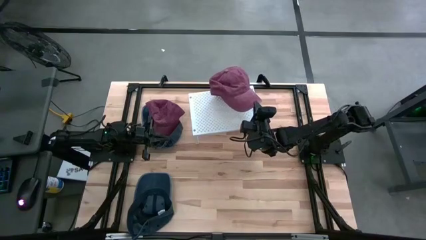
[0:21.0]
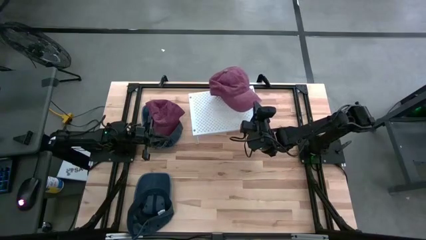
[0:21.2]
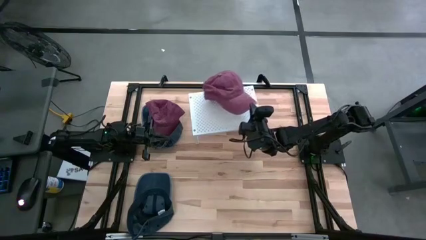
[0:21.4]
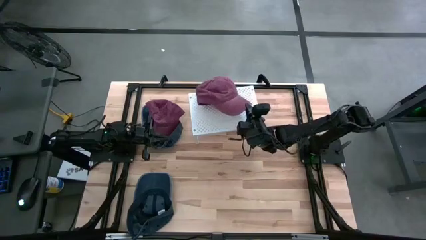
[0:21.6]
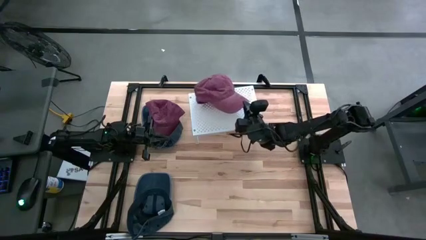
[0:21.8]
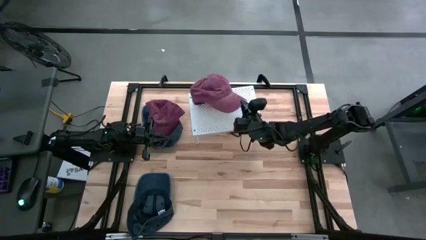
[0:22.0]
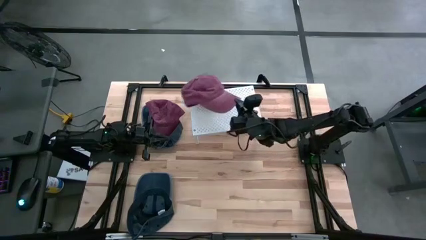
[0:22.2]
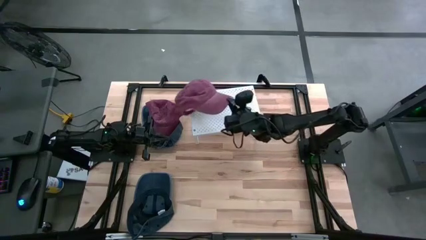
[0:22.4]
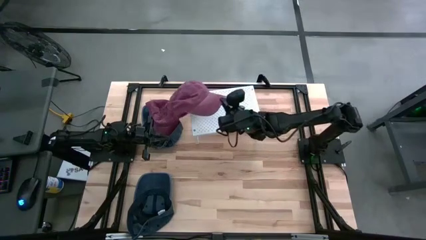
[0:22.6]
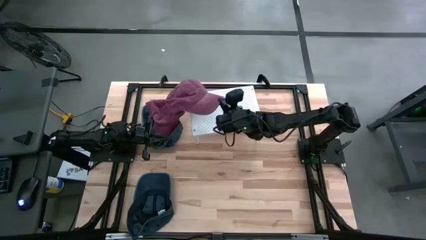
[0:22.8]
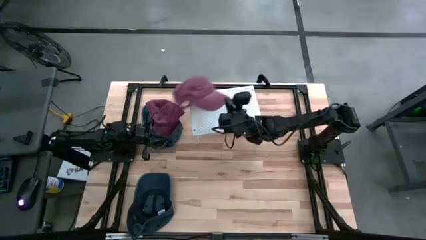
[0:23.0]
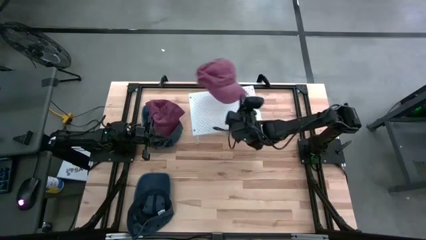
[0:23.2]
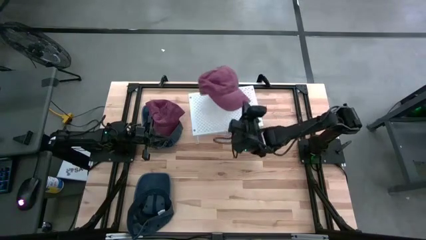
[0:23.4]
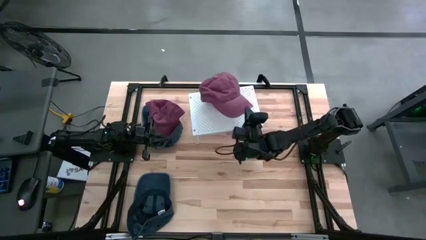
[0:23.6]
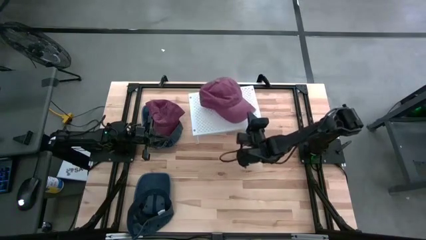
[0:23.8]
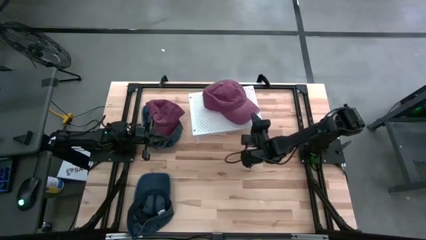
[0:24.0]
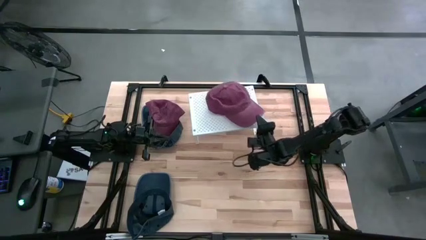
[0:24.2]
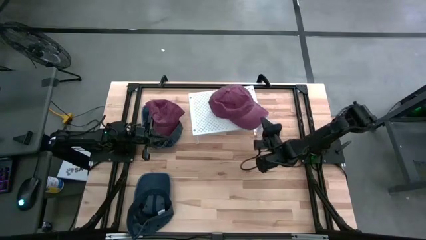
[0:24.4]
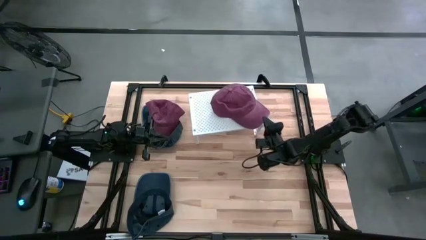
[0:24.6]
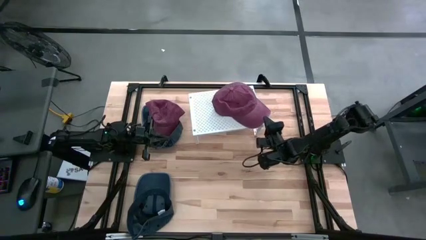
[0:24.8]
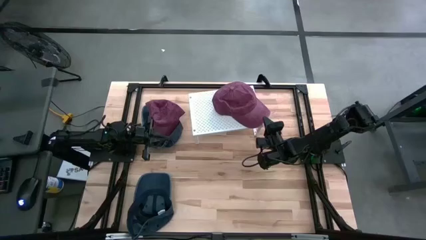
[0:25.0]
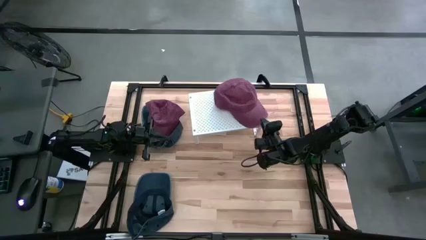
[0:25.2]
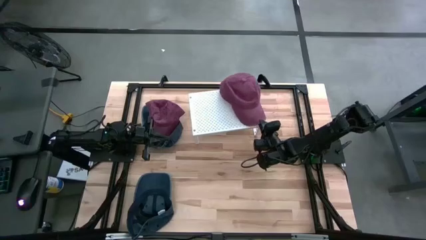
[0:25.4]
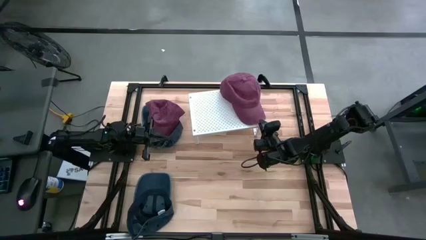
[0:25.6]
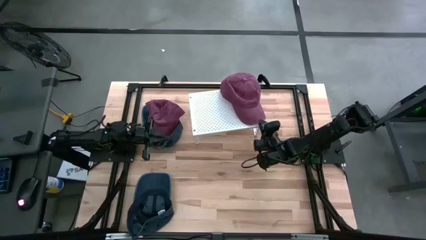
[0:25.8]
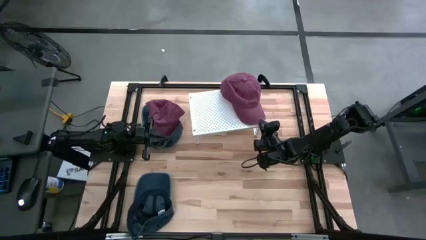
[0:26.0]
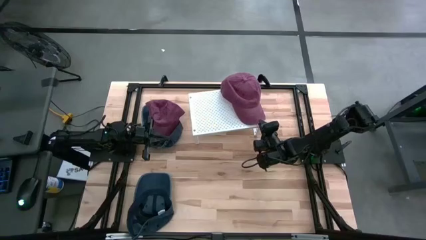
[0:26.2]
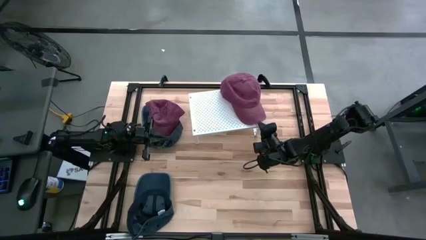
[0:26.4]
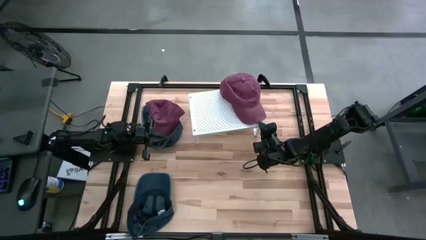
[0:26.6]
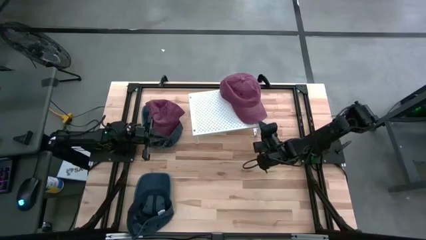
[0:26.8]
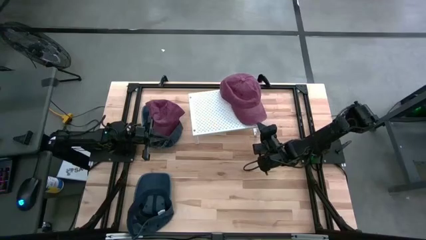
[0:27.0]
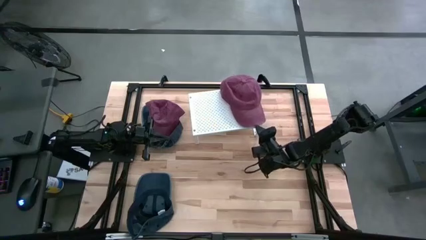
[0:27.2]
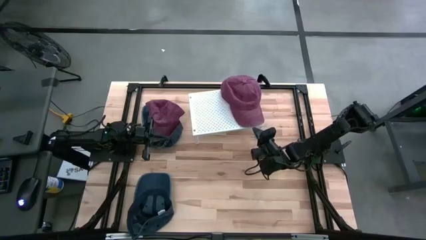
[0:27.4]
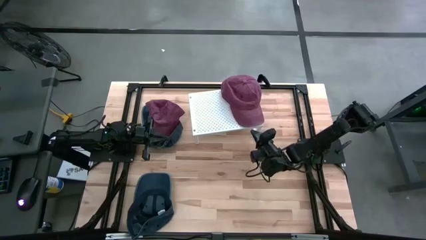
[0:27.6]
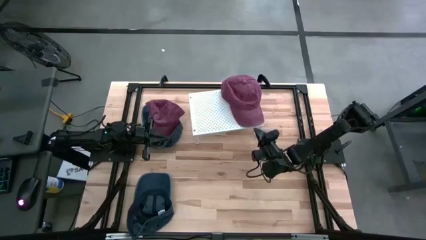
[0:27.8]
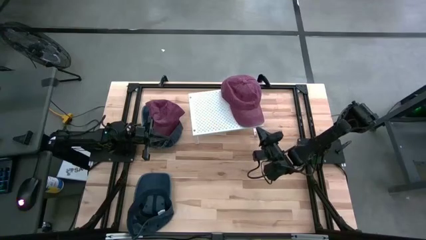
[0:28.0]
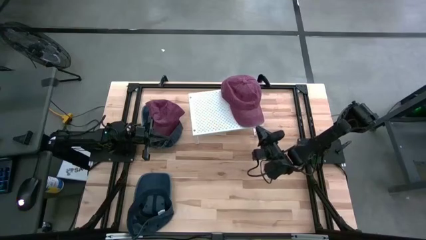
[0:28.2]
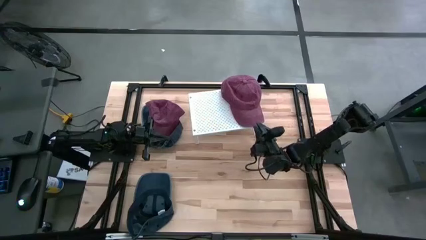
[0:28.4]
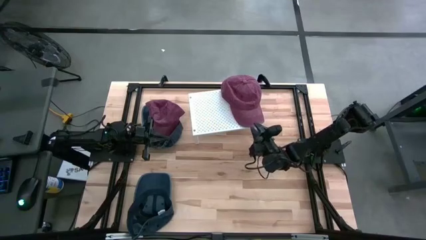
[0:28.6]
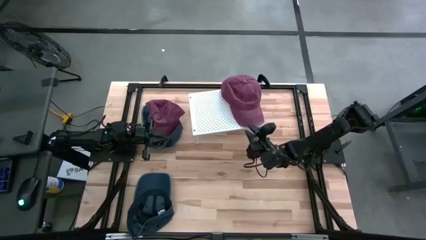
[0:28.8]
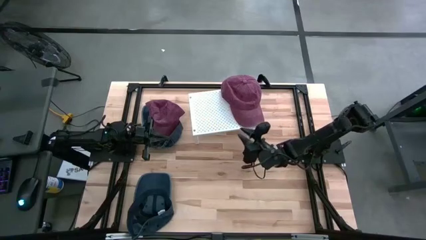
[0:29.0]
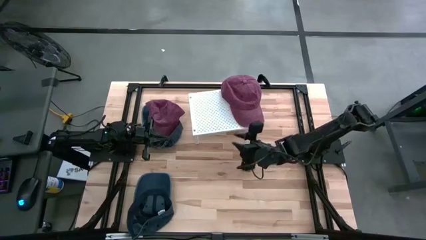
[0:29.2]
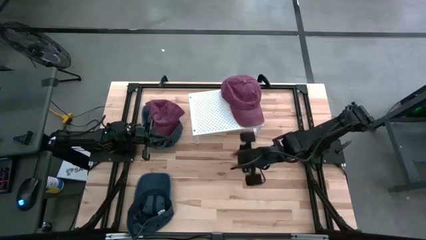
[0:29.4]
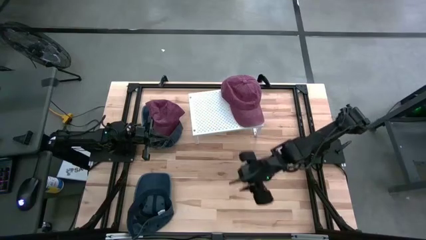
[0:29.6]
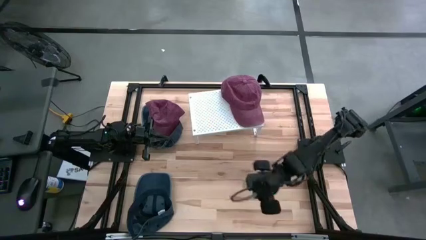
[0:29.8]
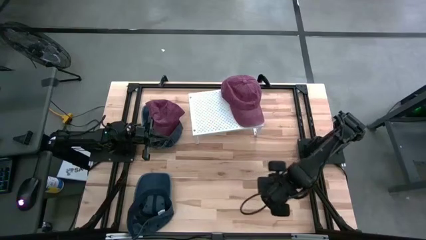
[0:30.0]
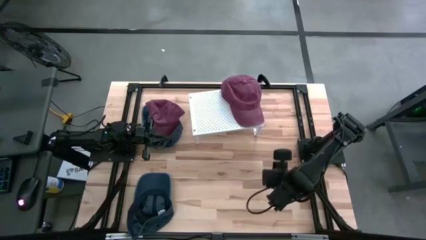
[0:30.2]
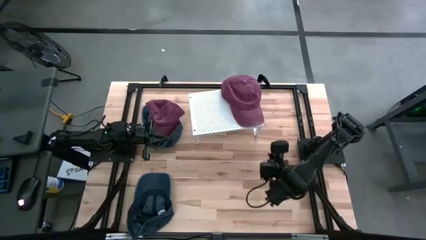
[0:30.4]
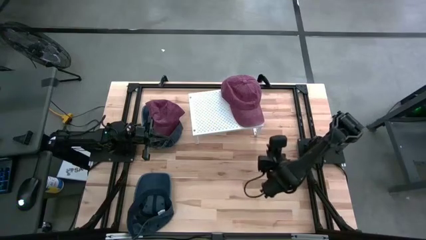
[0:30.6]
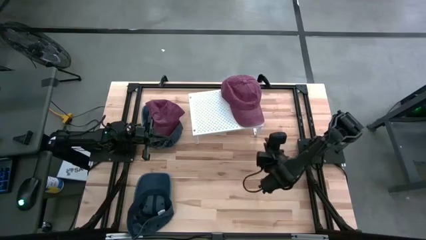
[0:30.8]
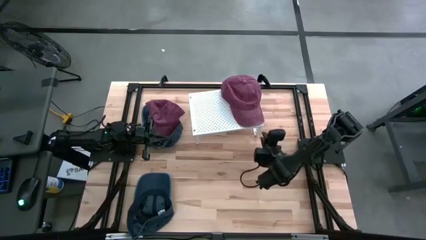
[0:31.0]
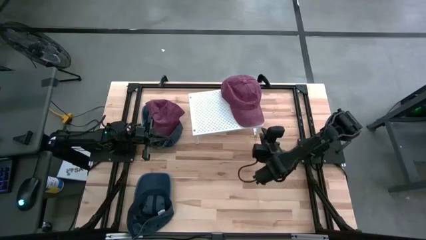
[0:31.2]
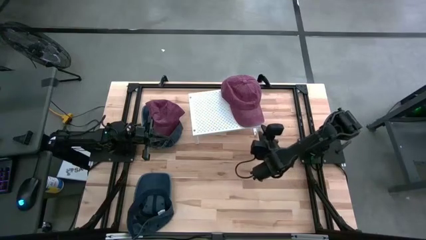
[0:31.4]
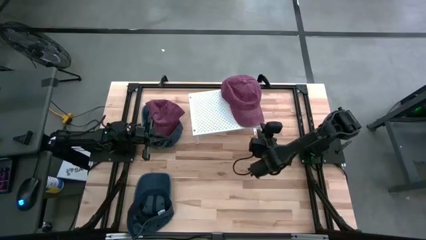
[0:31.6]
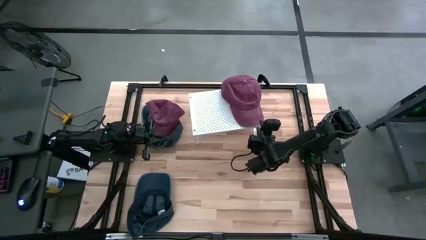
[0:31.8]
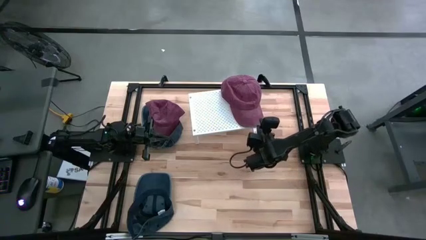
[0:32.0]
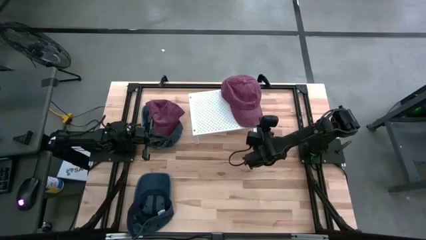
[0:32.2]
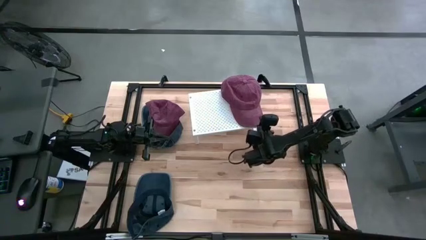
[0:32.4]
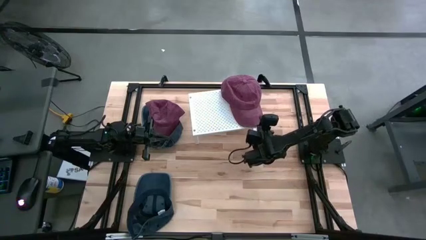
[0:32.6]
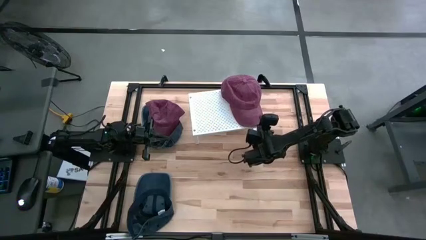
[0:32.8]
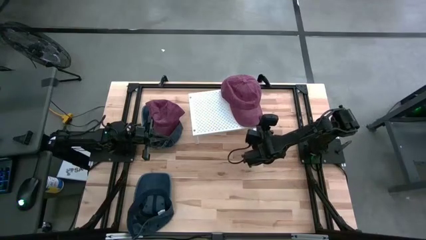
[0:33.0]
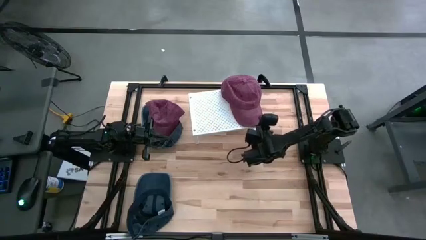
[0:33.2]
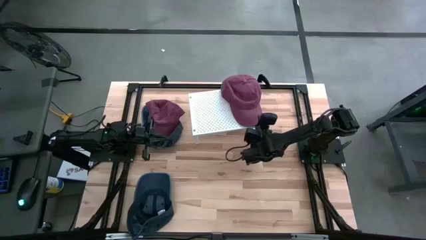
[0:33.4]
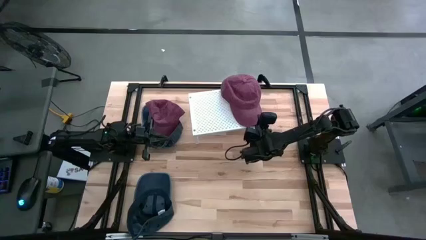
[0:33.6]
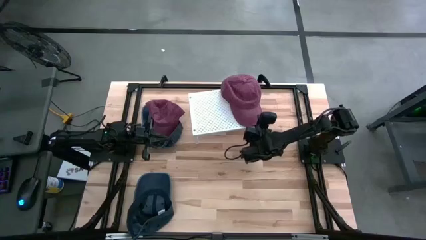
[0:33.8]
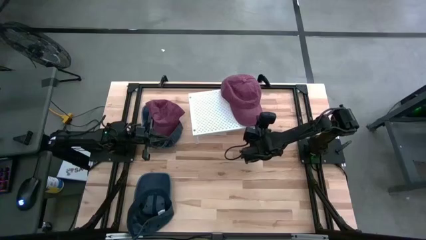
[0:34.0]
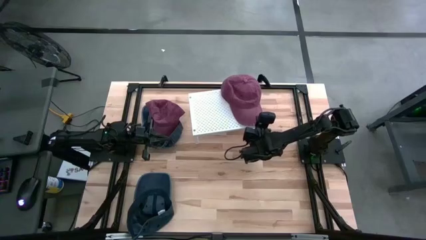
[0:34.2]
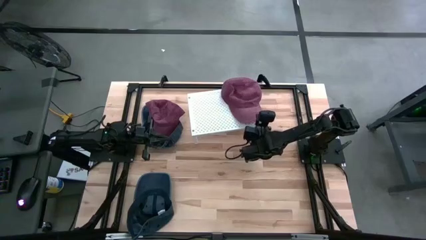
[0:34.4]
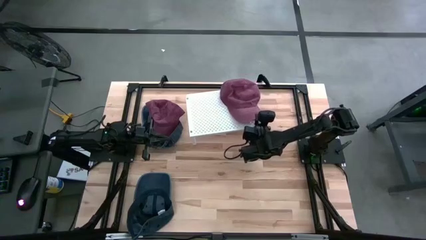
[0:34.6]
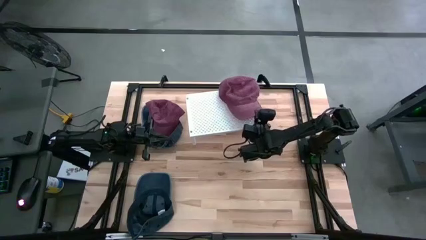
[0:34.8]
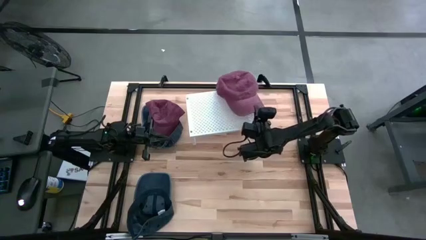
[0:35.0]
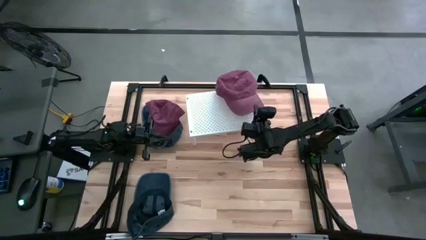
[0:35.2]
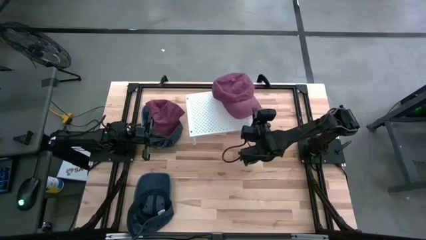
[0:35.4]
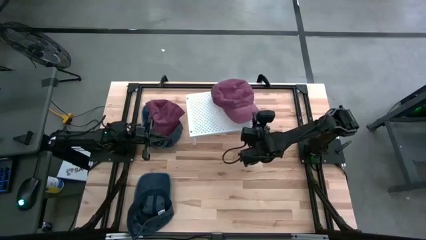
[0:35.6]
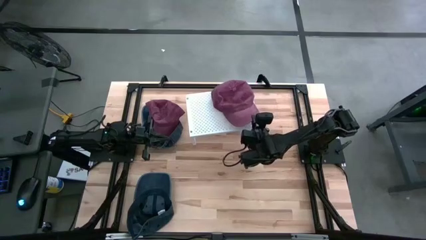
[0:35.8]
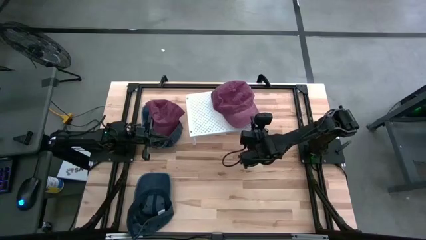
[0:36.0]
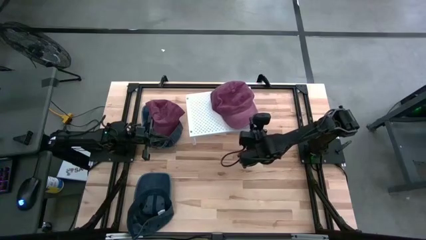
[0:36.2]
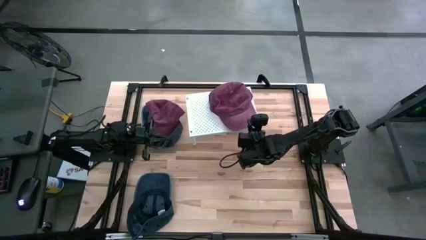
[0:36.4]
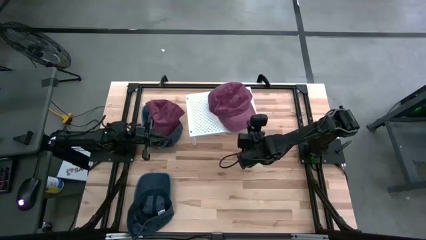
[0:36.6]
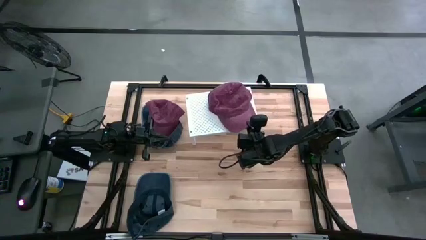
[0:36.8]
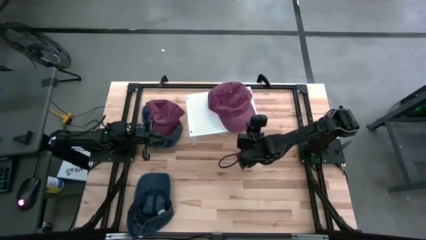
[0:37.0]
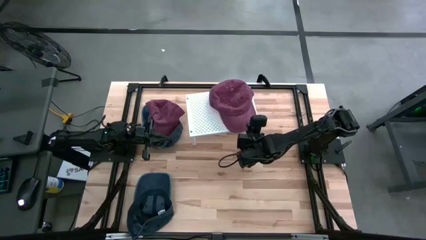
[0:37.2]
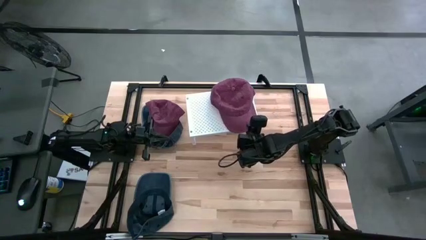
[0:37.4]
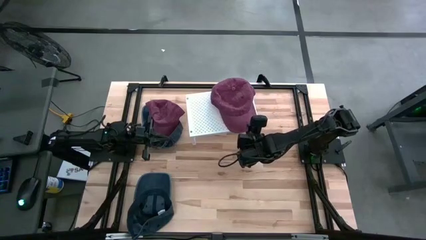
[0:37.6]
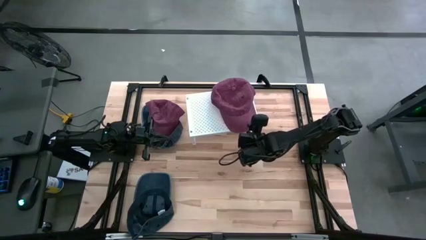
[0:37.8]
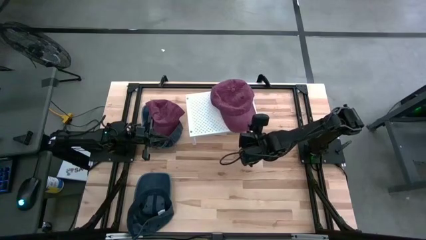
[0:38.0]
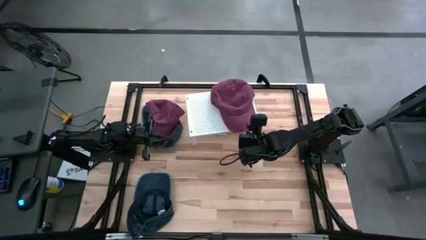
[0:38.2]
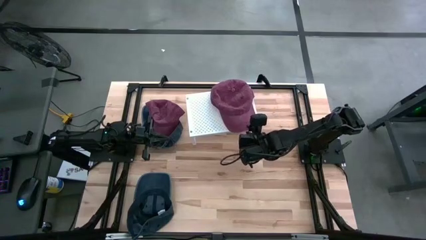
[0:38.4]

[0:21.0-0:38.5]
Task: Pick & Place hat
Put the bottom red cap on the shelf
